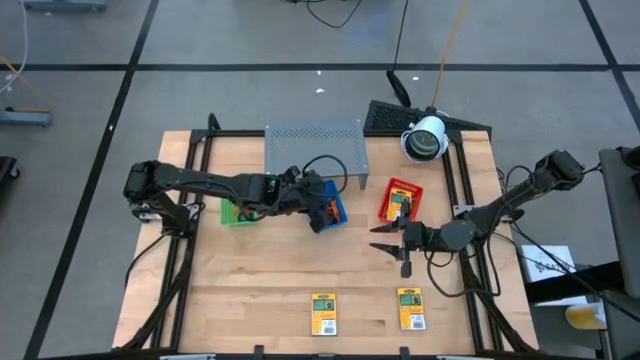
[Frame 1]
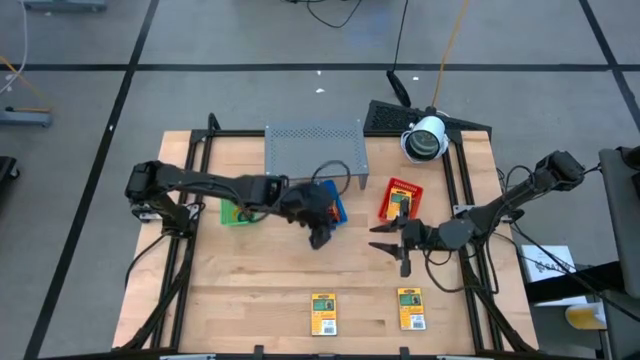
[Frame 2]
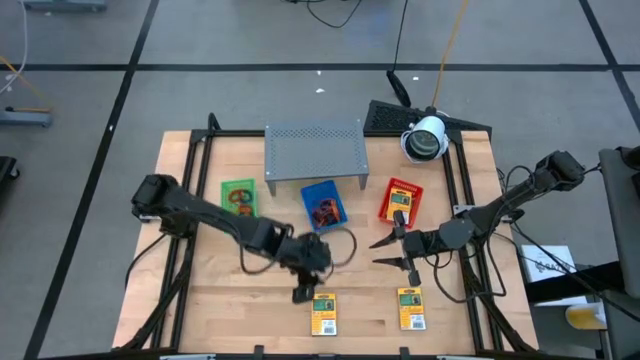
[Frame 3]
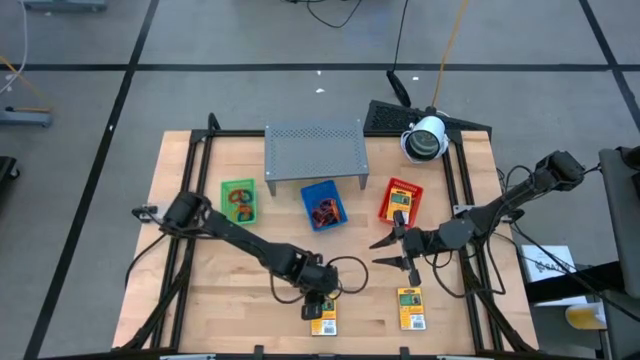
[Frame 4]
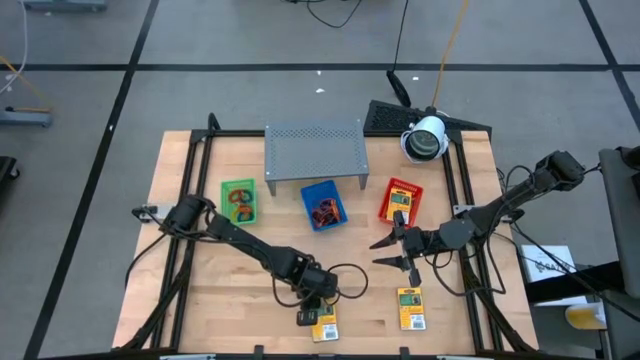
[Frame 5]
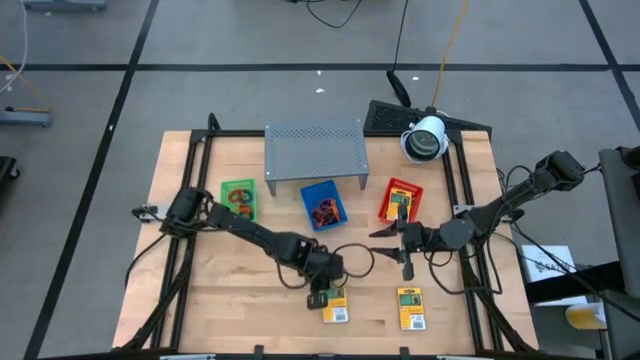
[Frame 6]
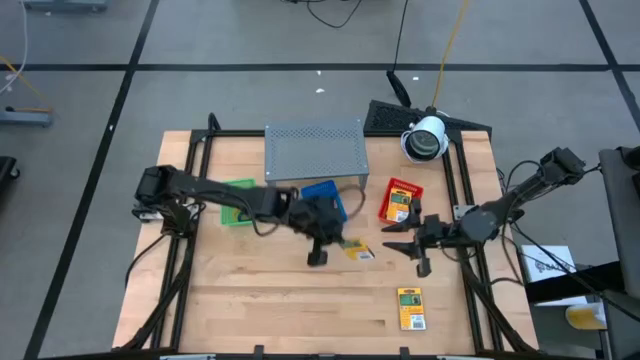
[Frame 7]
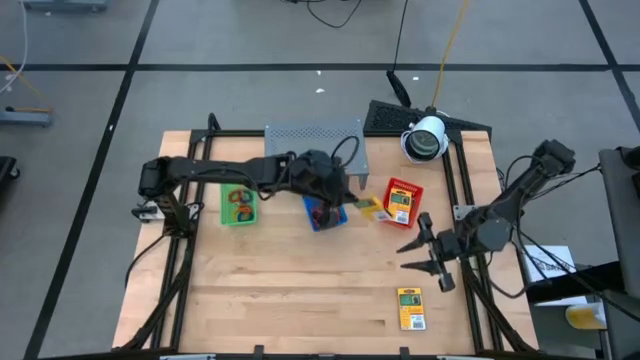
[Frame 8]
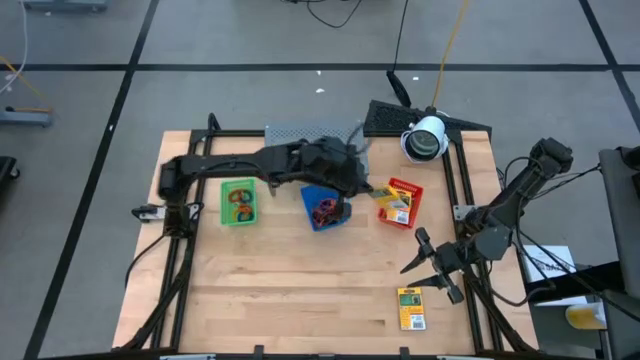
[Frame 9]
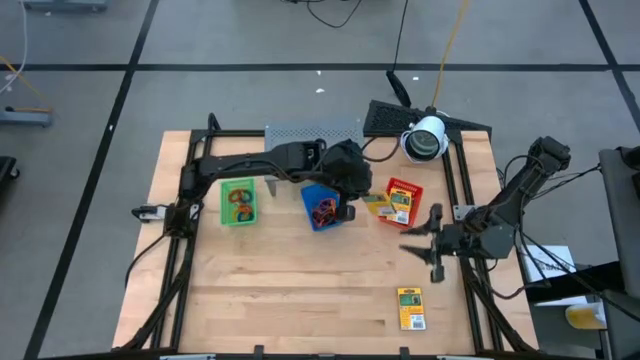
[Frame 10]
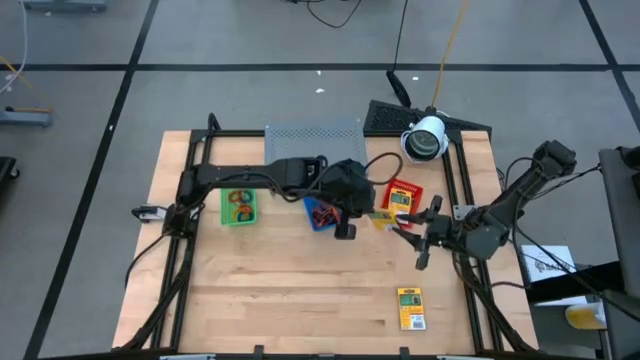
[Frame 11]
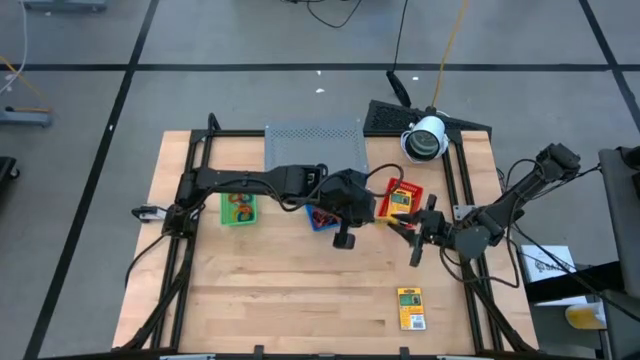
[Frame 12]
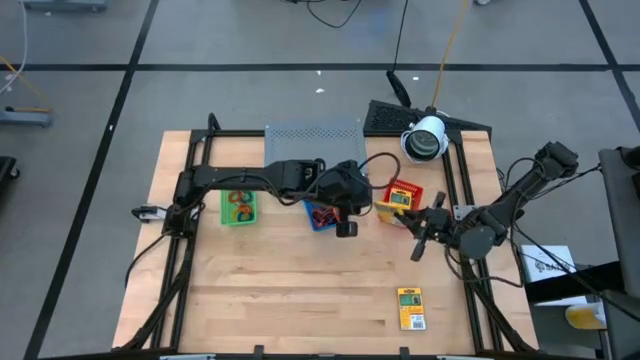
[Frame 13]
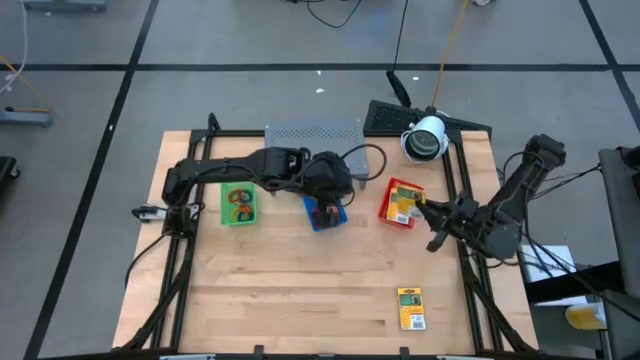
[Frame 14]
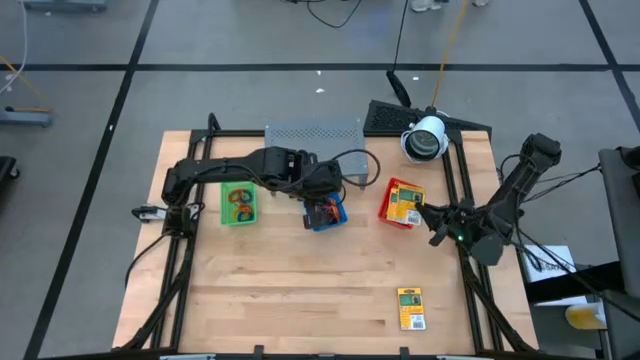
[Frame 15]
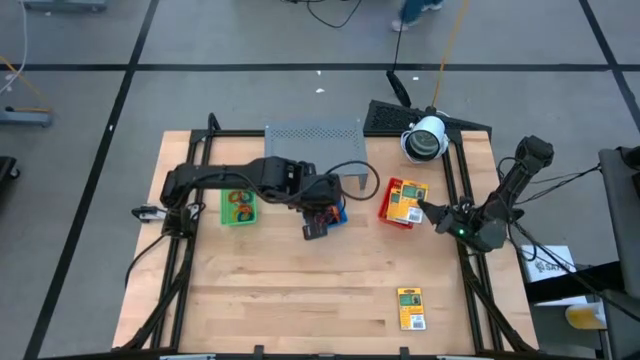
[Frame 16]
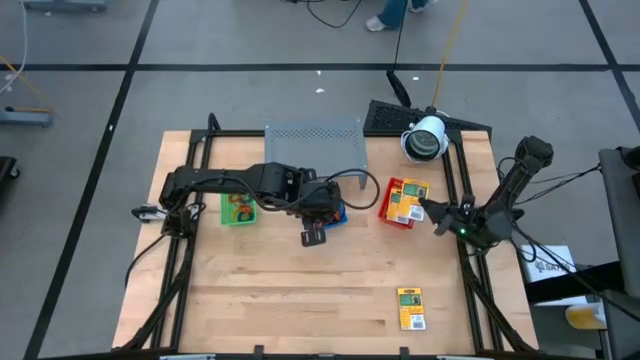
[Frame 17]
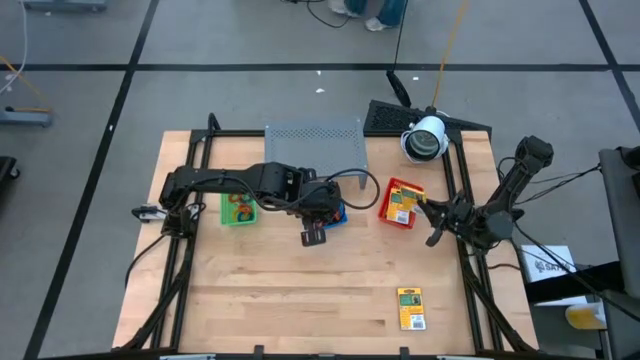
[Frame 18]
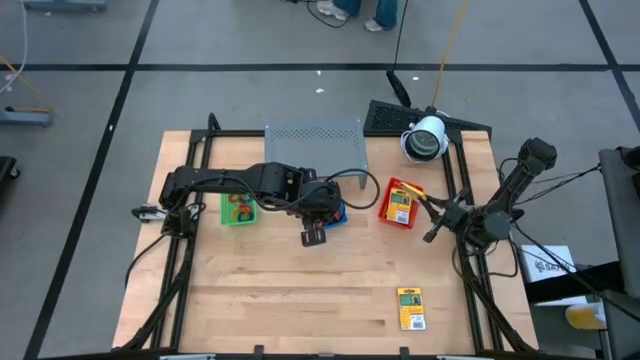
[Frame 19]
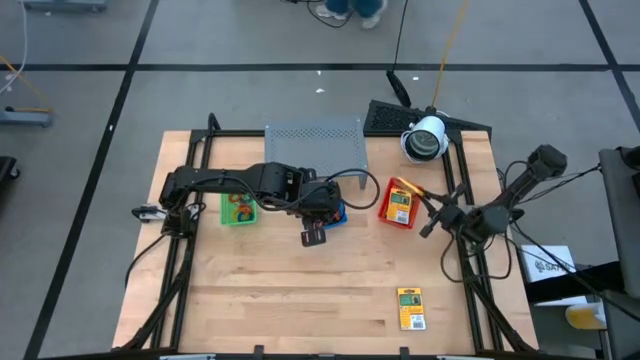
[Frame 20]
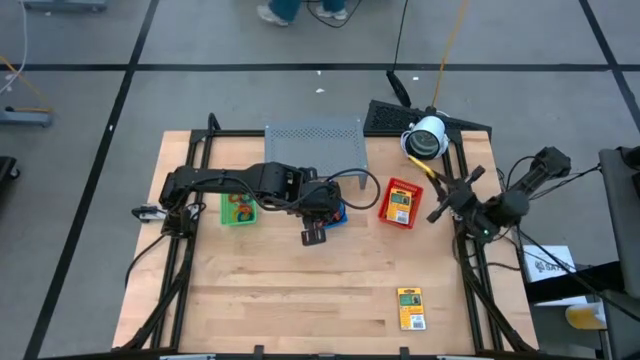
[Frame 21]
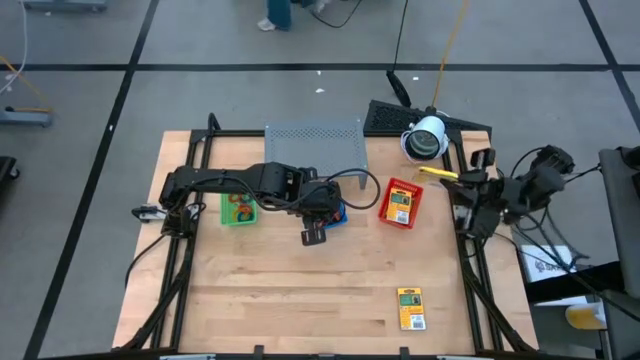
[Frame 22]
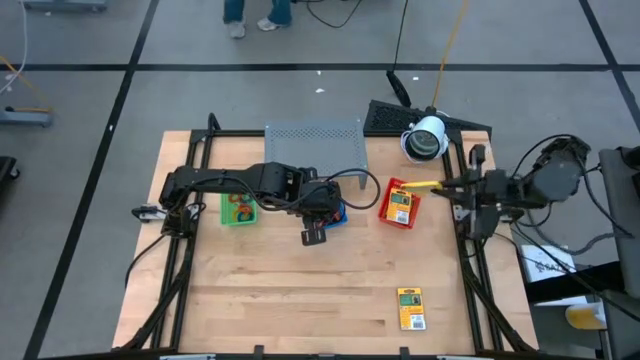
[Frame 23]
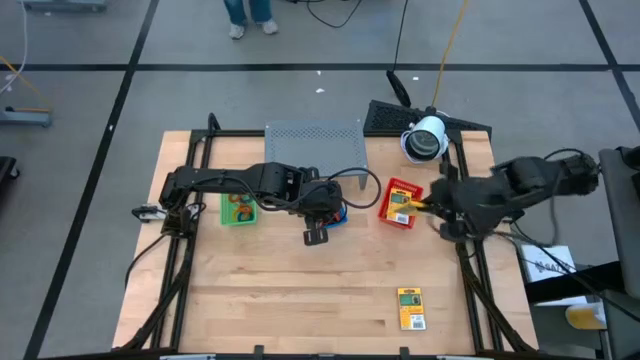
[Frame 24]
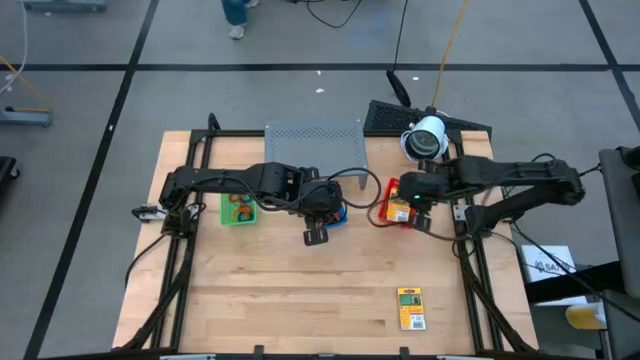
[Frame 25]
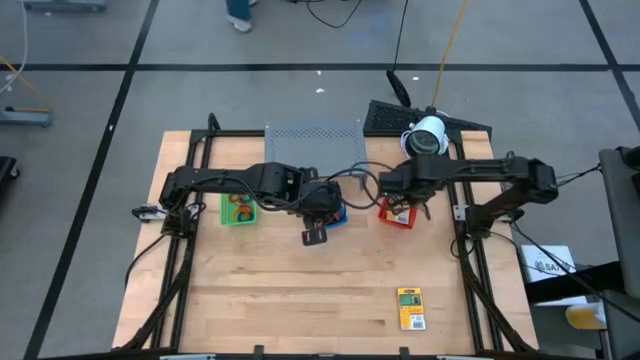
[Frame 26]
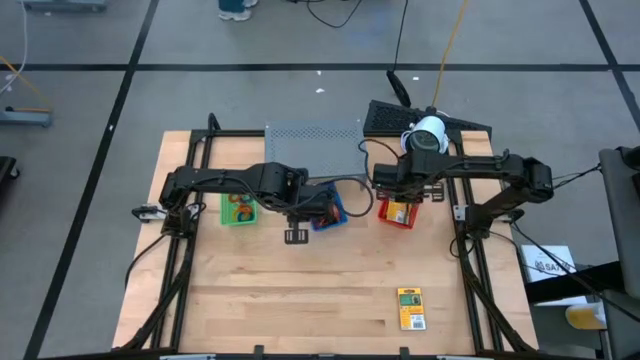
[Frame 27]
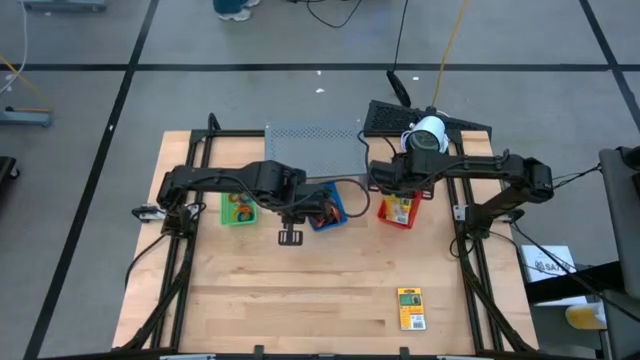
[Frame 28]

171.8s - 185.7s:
Task: Pick & Place Office Desk Supplies
Put the crayon pack into the orange bin

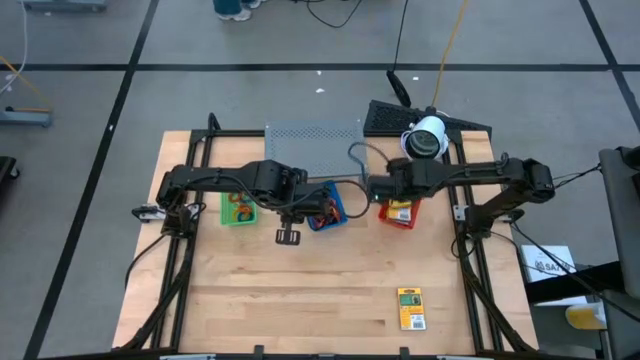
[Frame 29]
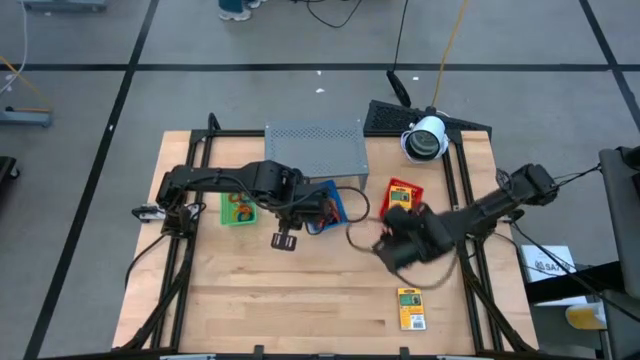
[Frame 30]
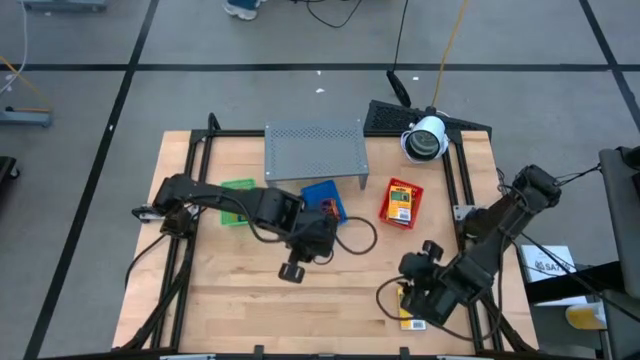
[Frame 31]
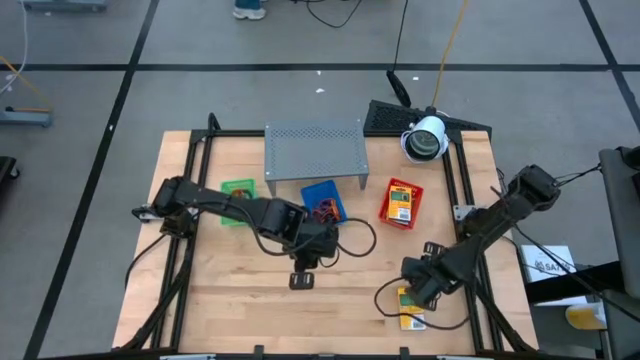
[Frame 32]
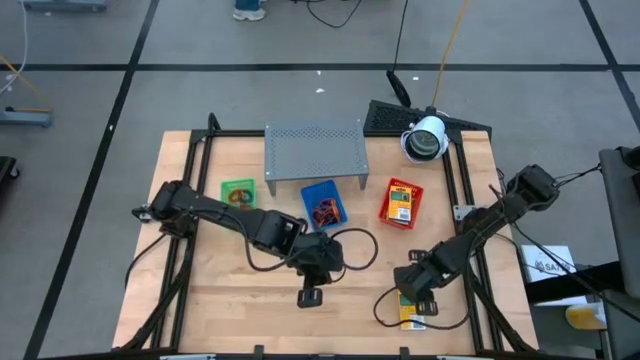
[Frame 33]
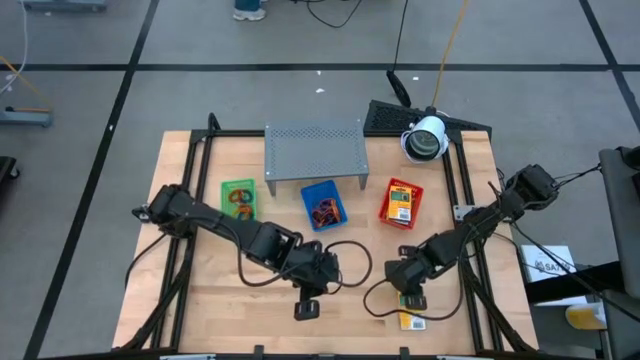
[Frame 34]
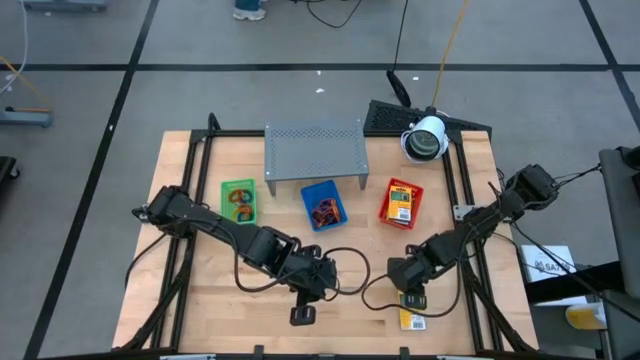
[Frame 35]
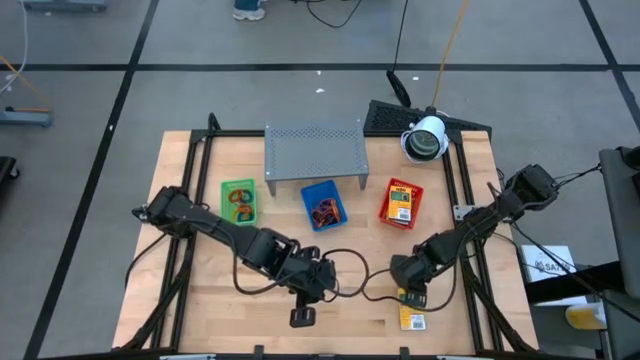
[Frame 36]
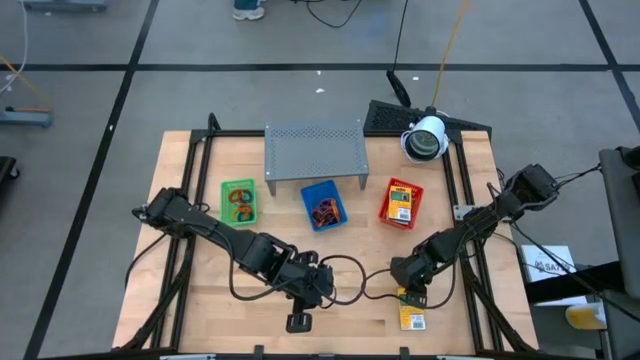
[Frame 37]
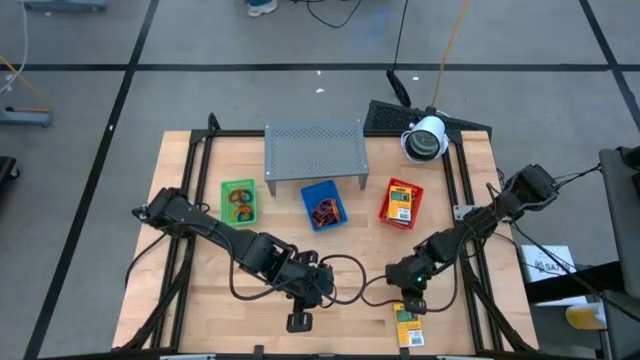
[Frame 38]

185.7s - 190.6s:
Put the crayon pack into the orange bin

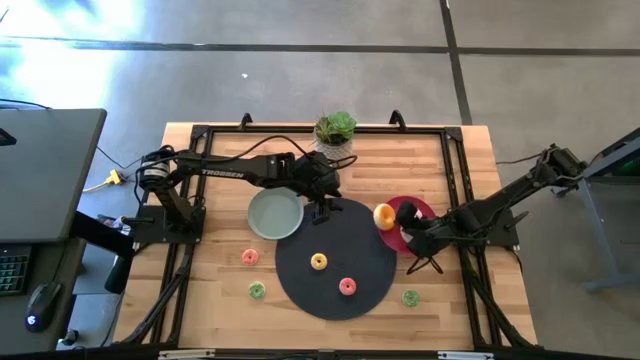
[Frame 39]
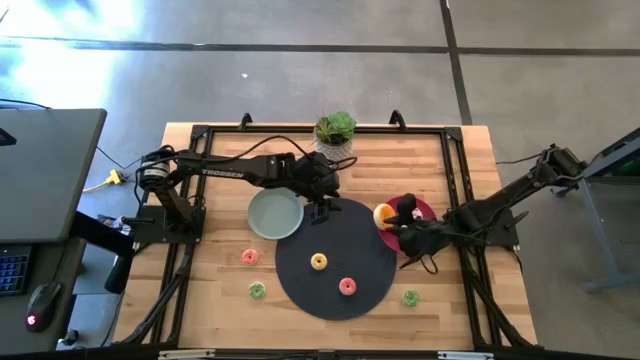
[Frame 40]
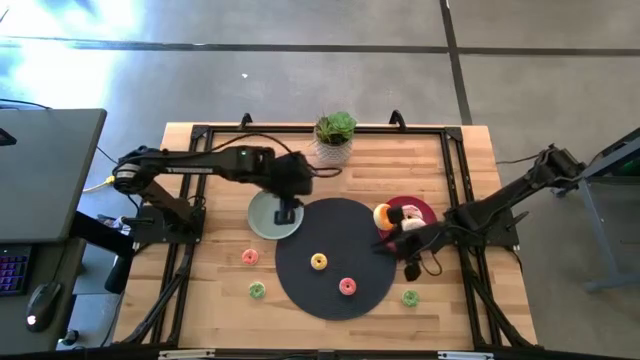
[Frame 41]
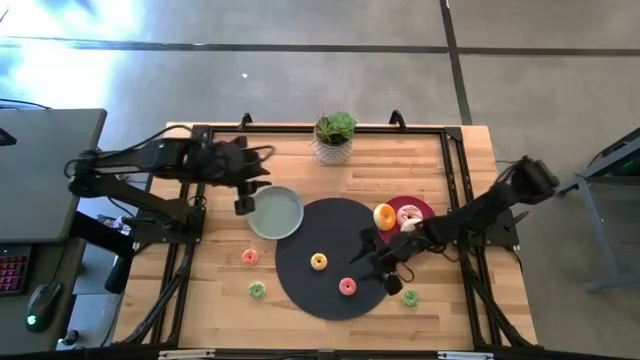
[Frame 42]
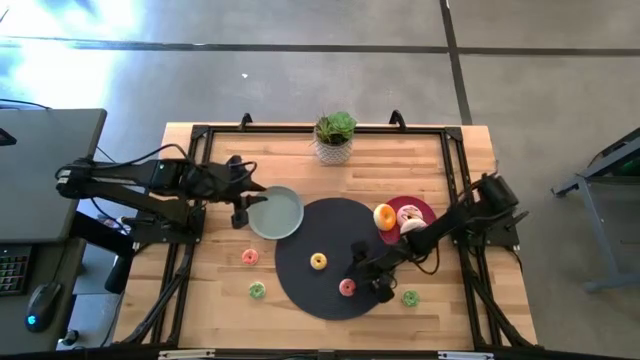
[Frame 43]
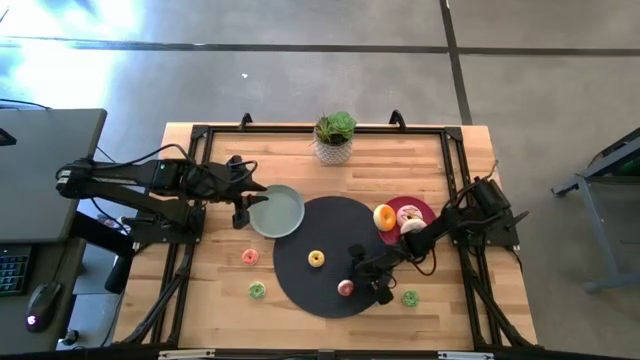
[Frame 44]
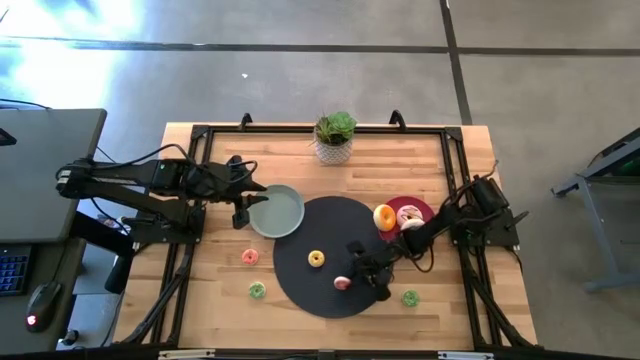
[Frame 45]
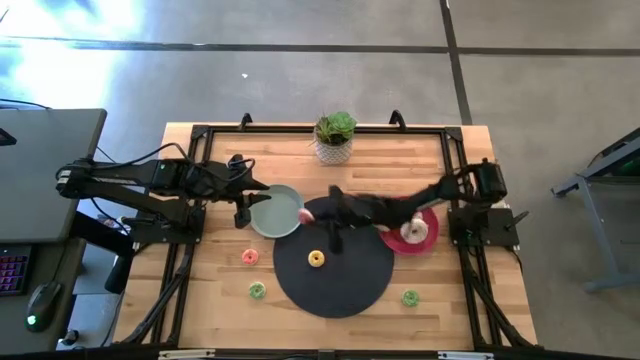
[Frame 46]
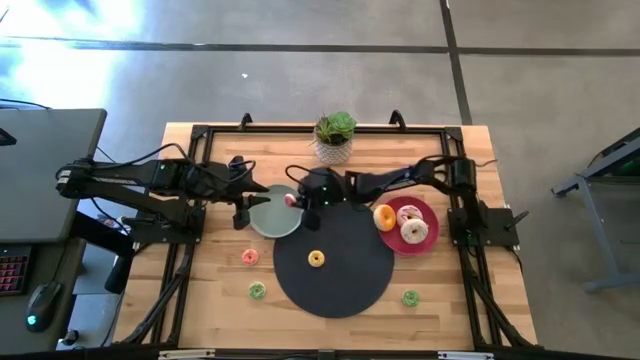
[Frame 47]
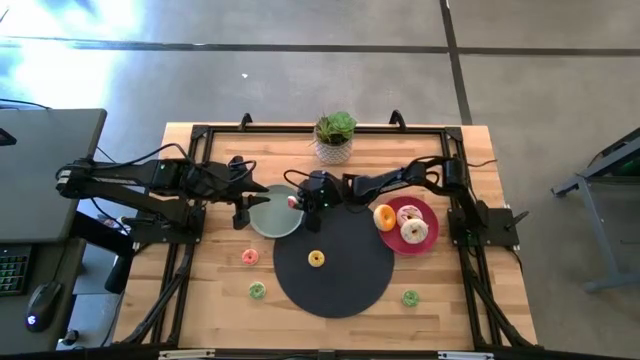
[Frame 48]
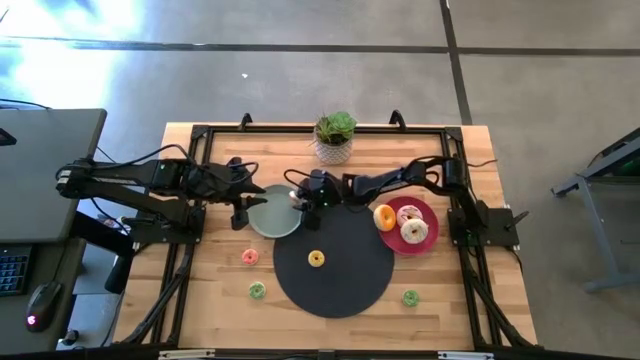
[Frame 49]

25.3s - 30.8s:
Task: Pick & Place donuts
Put the right small pink donut on the blue plate
